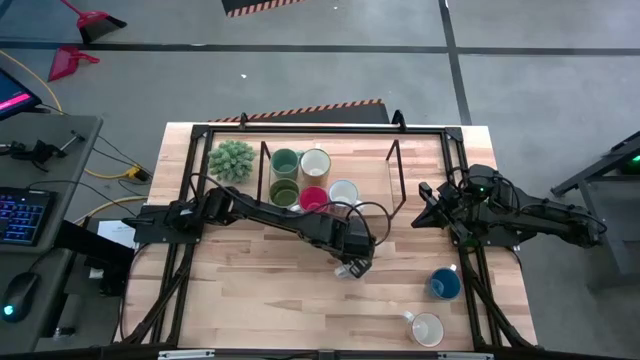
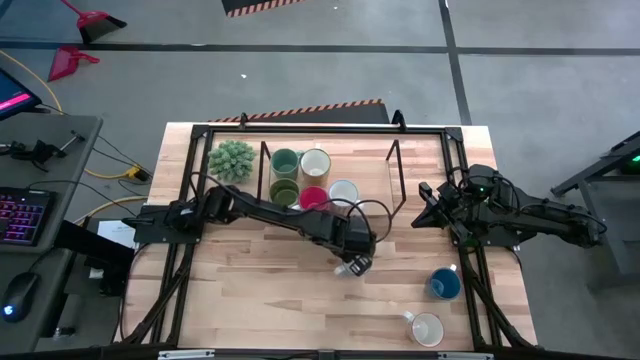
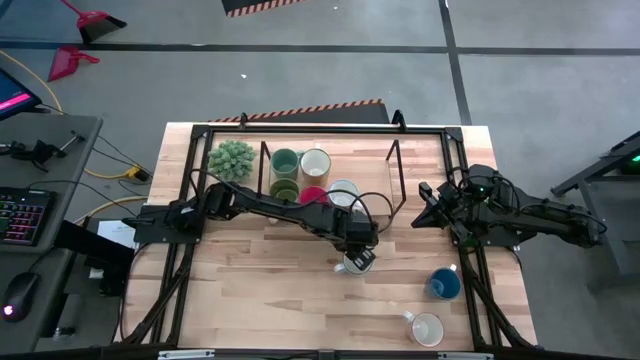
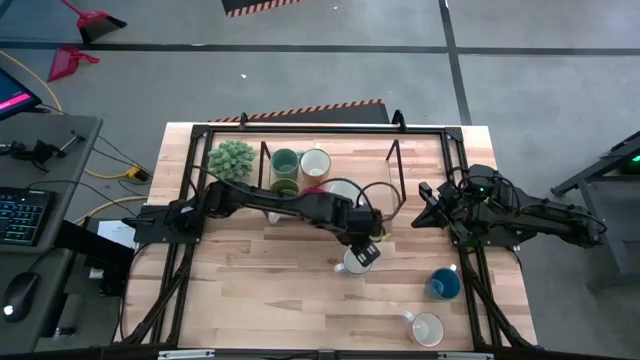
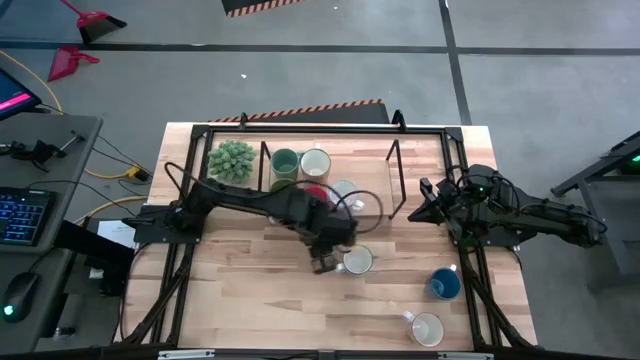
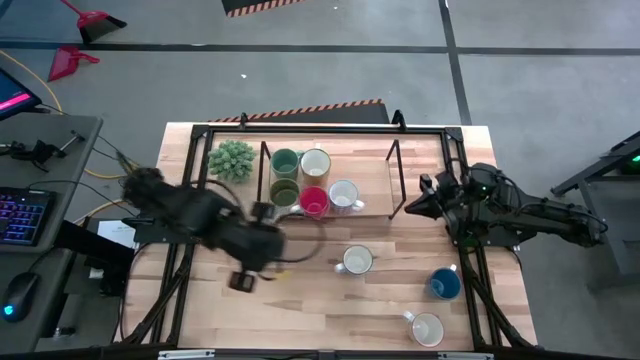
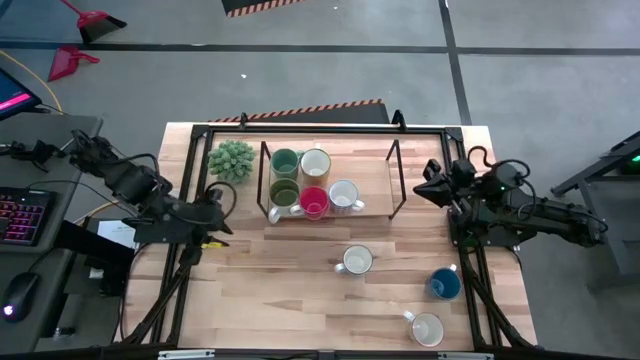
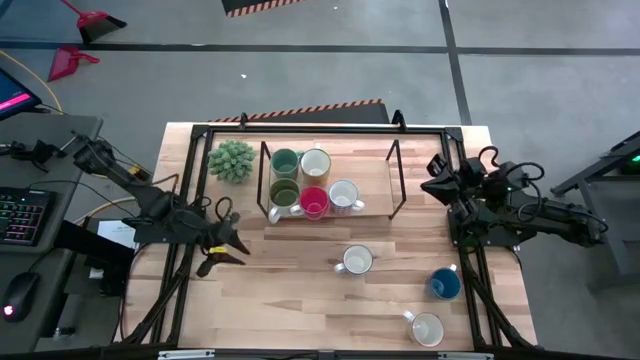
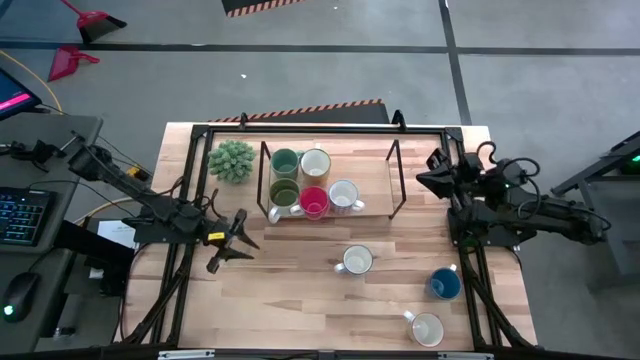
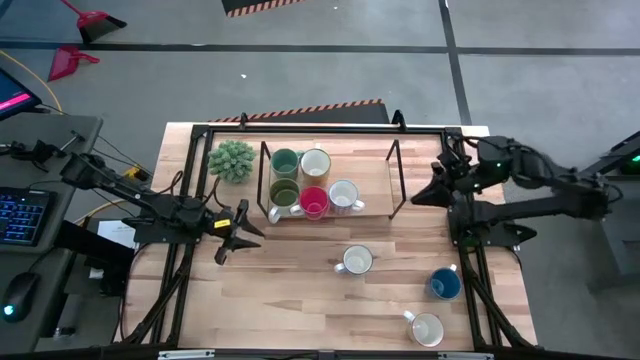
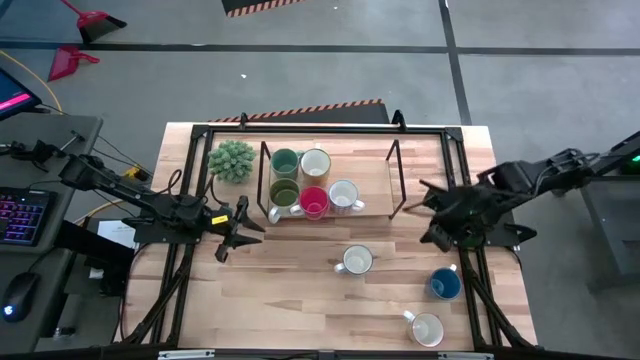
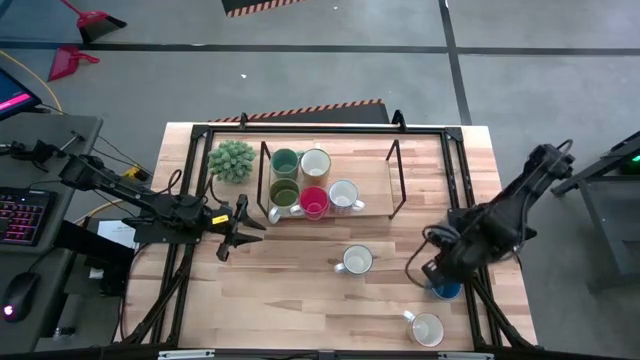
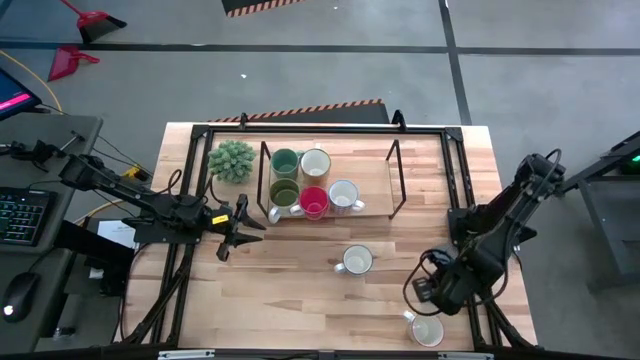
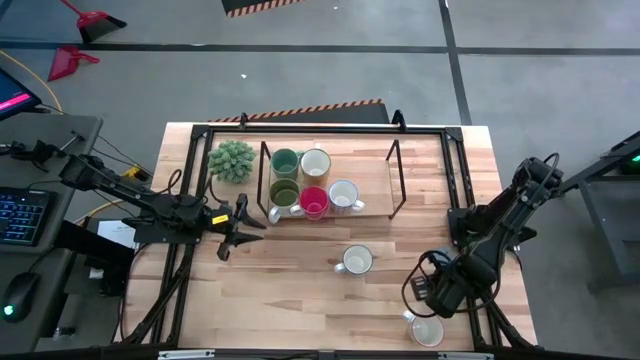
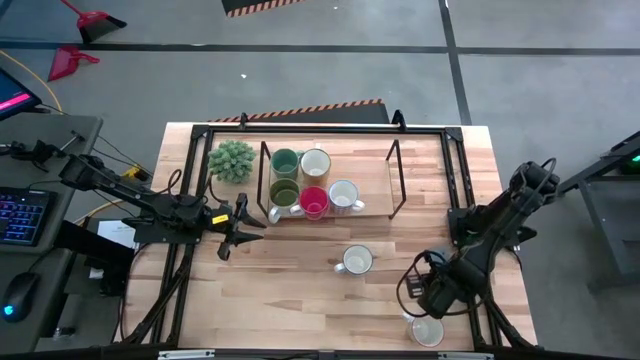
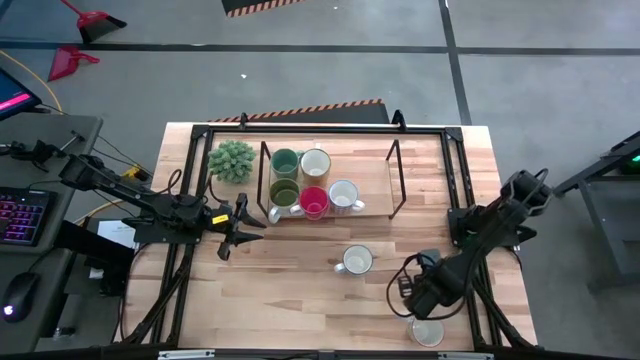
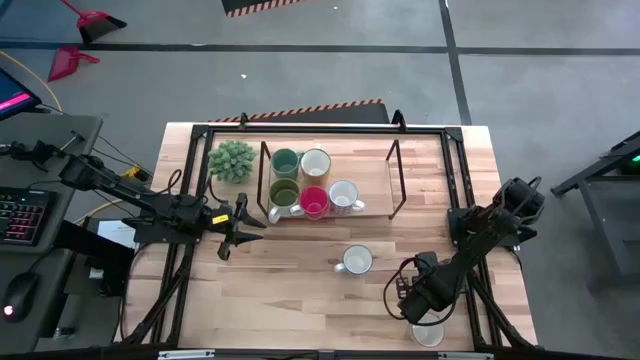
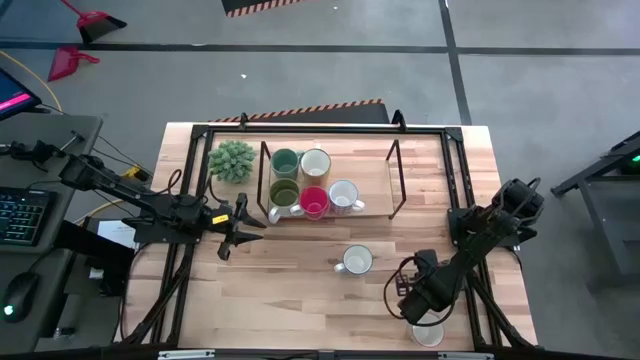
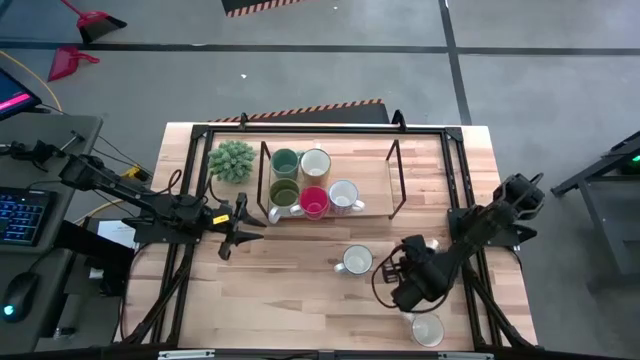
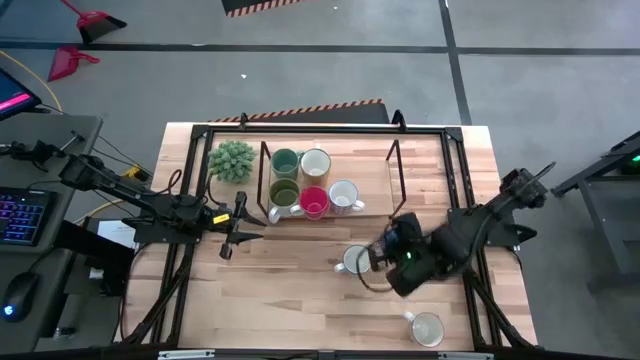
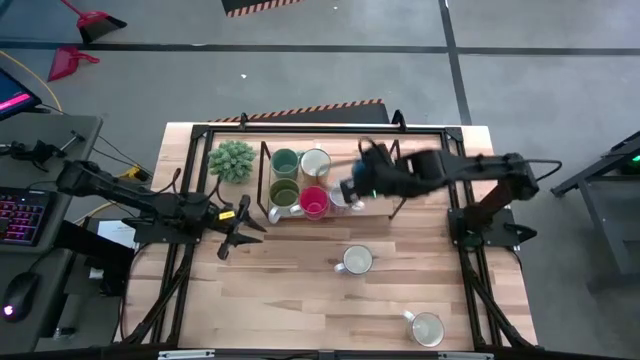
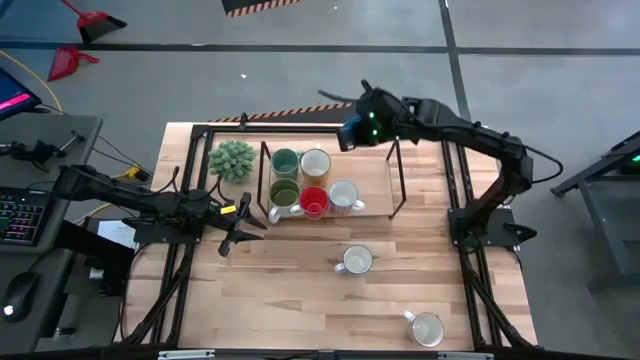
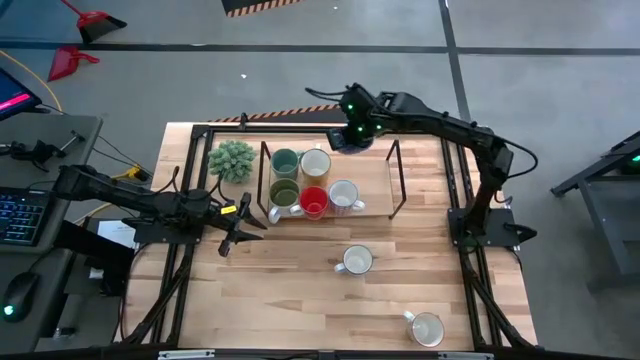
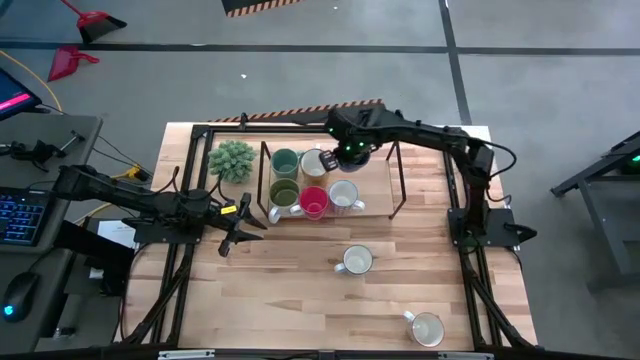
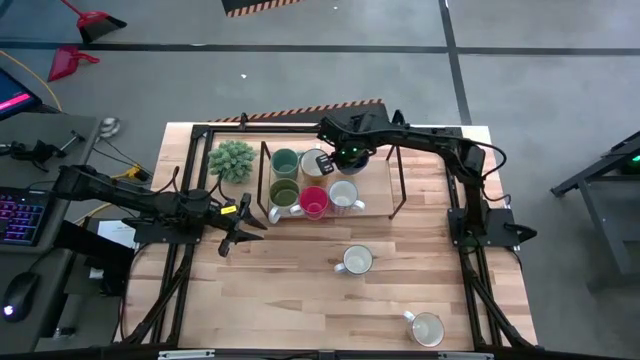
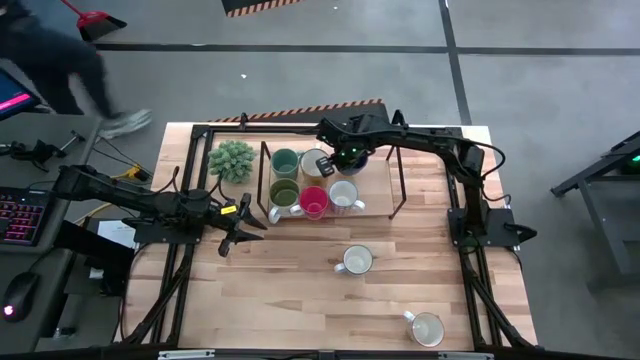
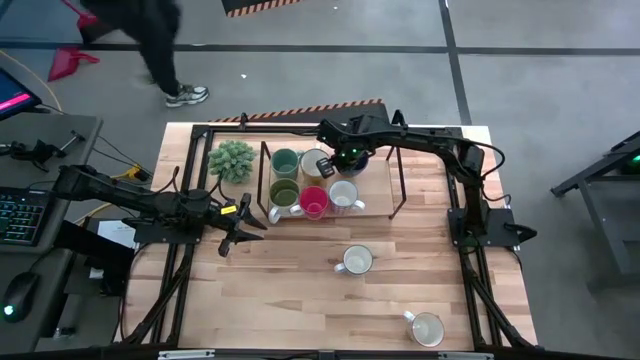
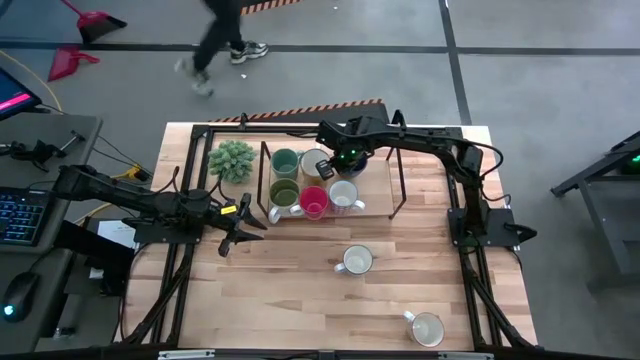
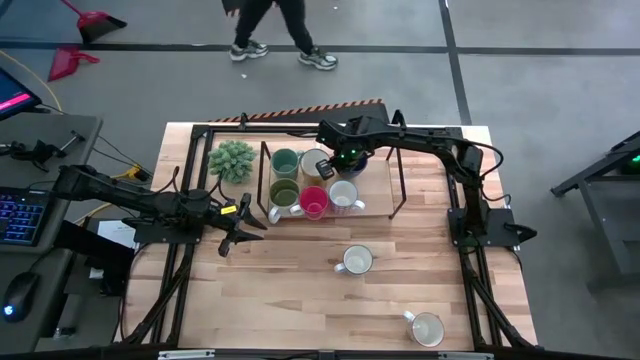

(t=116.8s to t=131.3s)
Task: Place coffee mugs
Put the dark blue mug on the shelf
